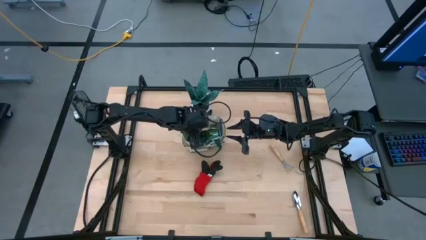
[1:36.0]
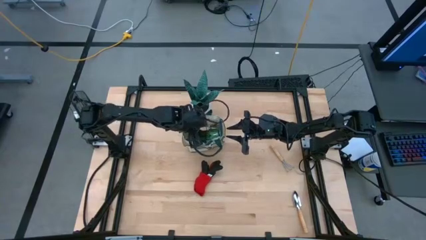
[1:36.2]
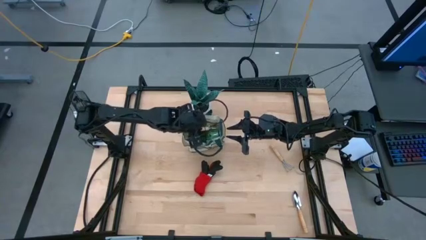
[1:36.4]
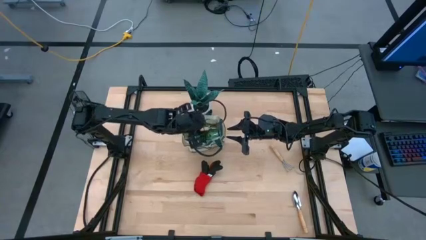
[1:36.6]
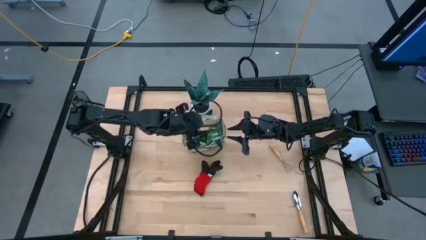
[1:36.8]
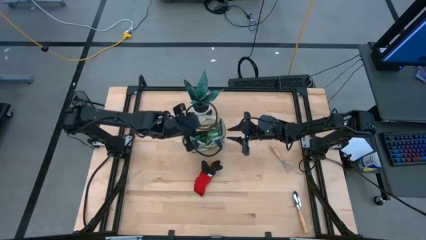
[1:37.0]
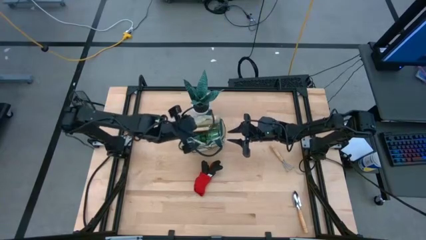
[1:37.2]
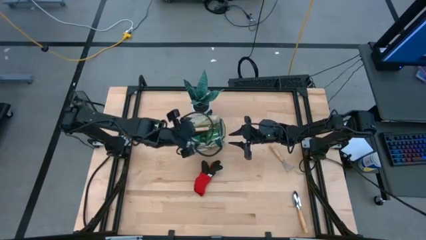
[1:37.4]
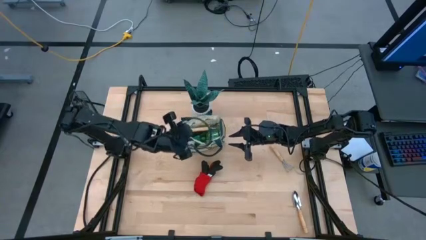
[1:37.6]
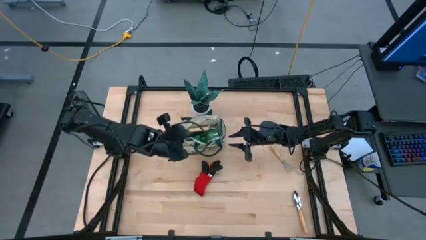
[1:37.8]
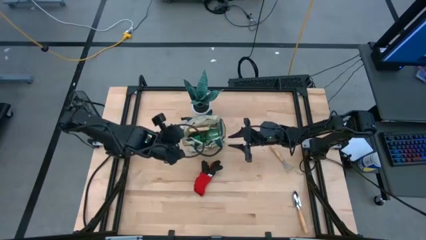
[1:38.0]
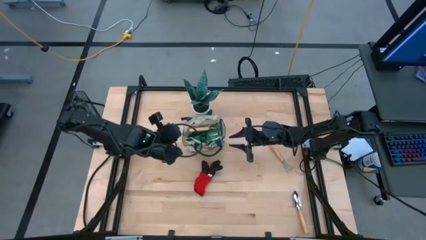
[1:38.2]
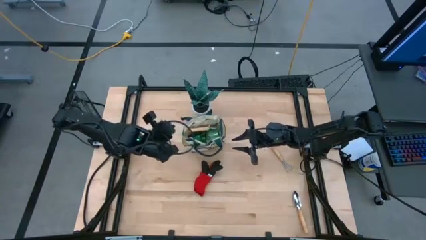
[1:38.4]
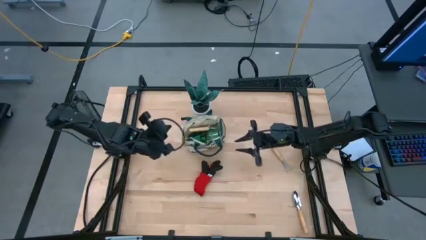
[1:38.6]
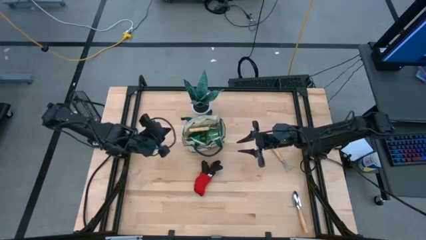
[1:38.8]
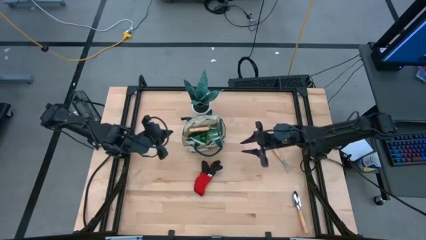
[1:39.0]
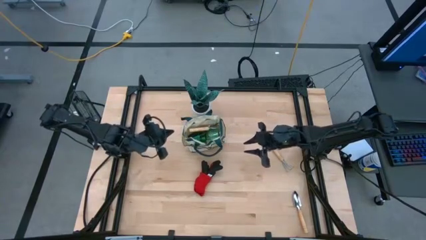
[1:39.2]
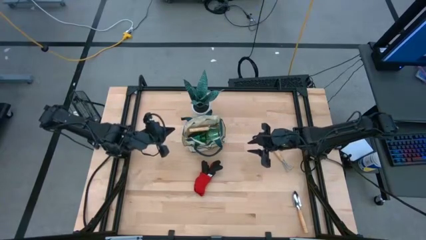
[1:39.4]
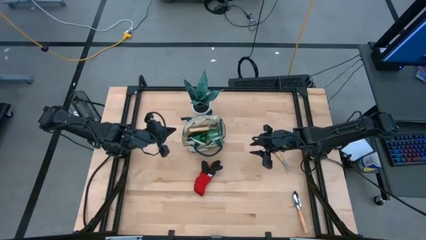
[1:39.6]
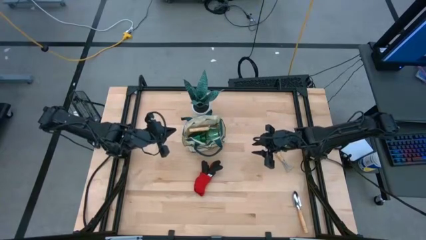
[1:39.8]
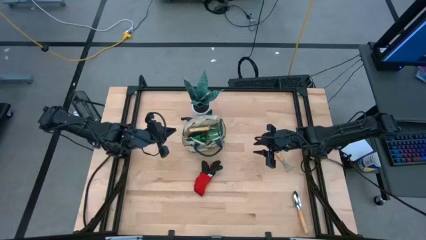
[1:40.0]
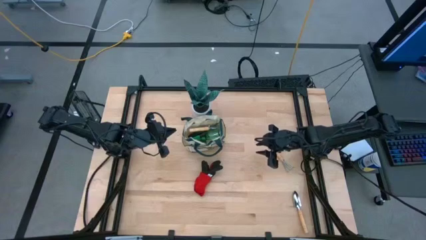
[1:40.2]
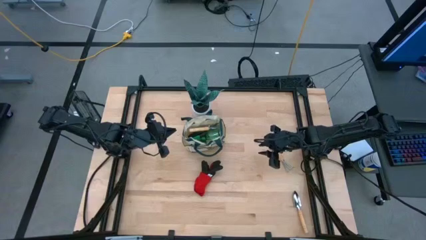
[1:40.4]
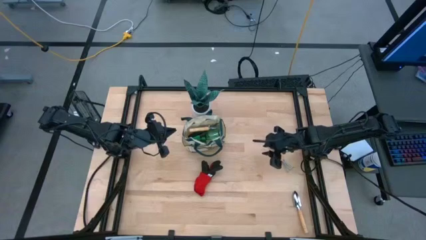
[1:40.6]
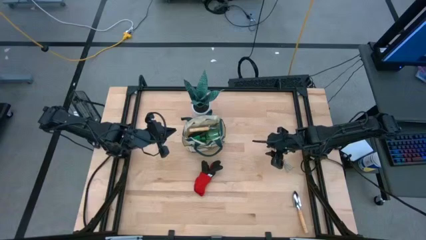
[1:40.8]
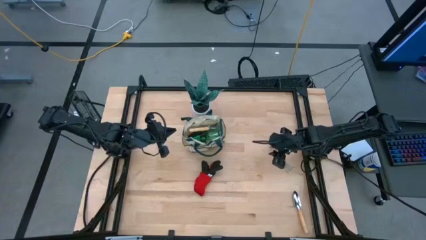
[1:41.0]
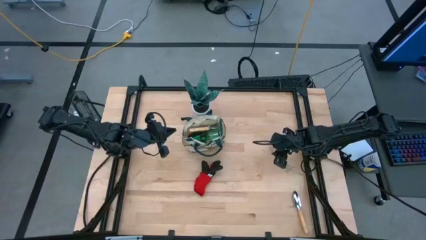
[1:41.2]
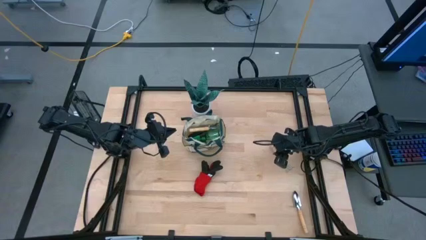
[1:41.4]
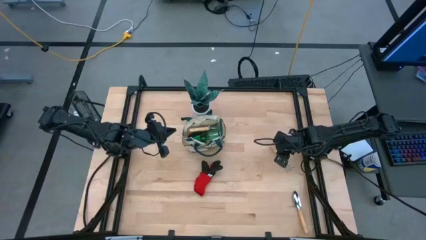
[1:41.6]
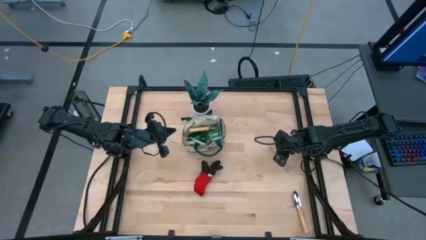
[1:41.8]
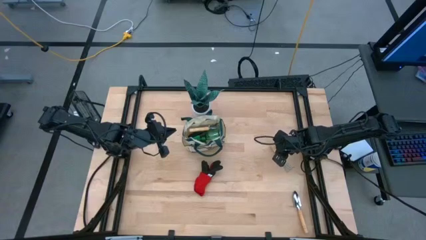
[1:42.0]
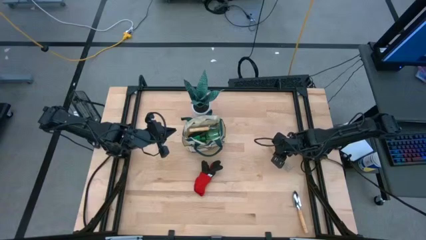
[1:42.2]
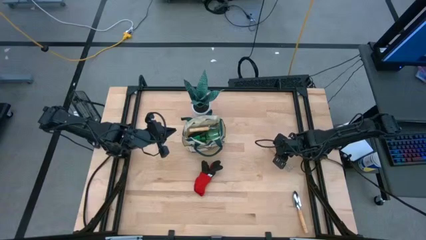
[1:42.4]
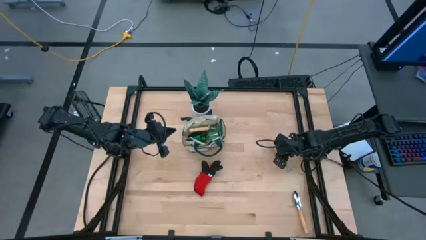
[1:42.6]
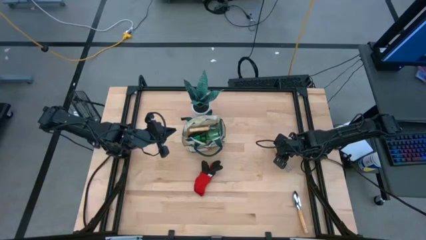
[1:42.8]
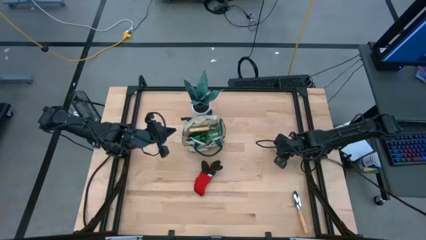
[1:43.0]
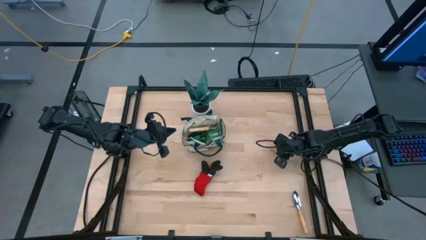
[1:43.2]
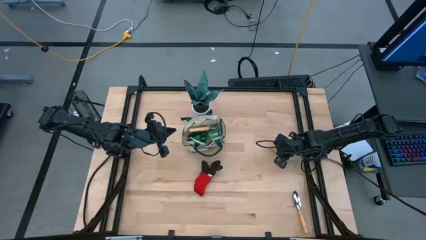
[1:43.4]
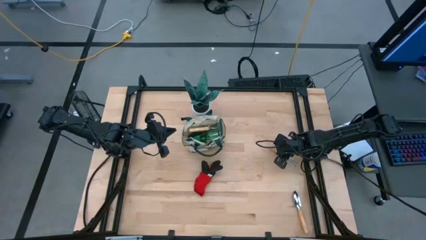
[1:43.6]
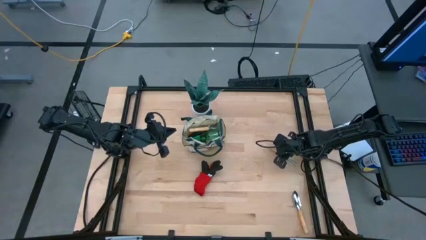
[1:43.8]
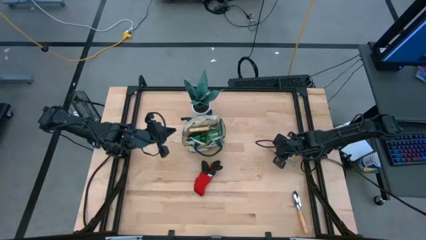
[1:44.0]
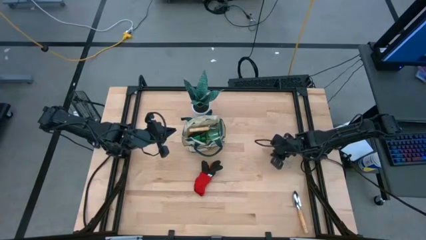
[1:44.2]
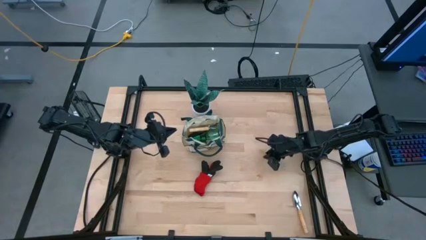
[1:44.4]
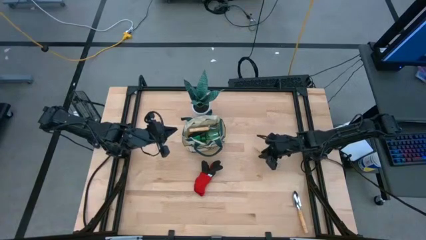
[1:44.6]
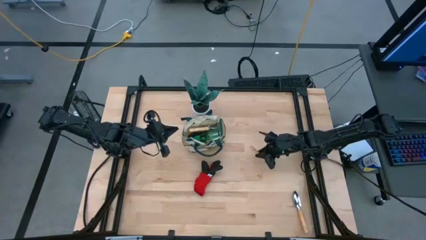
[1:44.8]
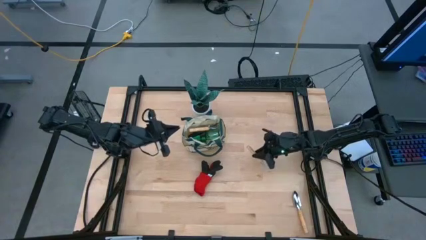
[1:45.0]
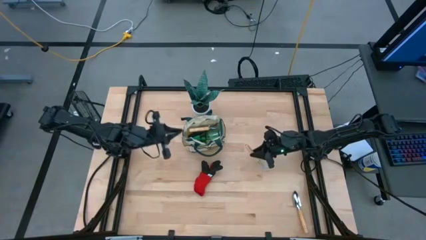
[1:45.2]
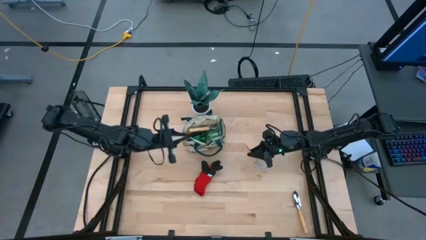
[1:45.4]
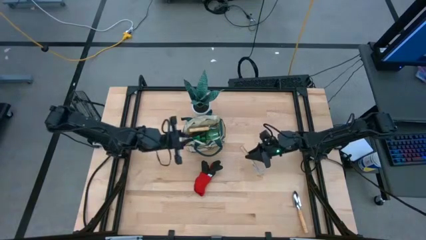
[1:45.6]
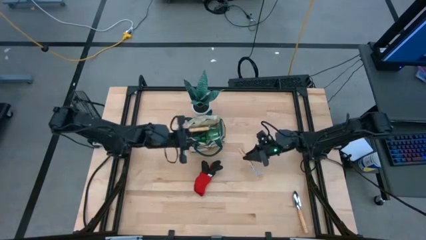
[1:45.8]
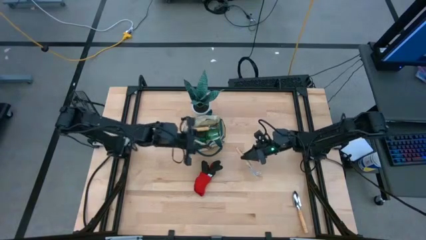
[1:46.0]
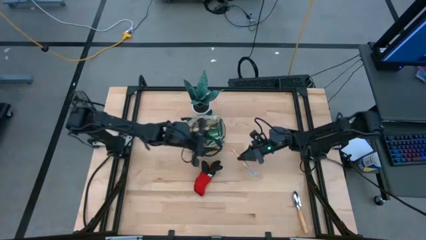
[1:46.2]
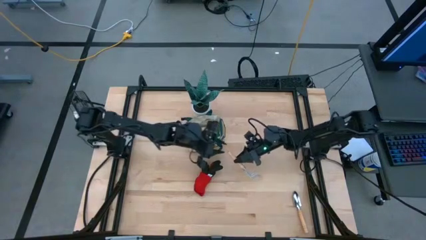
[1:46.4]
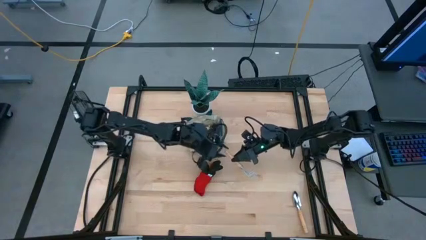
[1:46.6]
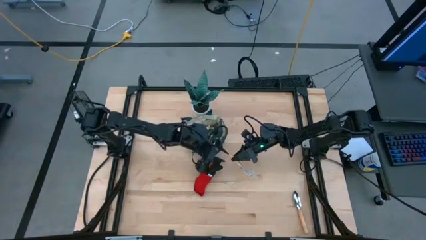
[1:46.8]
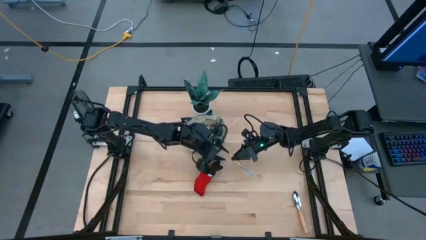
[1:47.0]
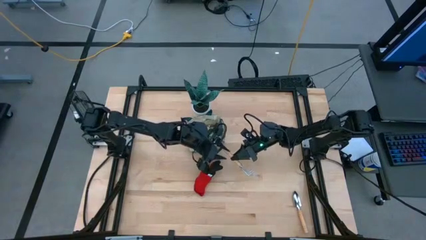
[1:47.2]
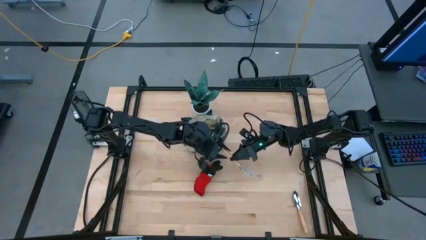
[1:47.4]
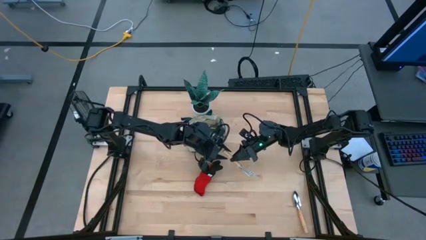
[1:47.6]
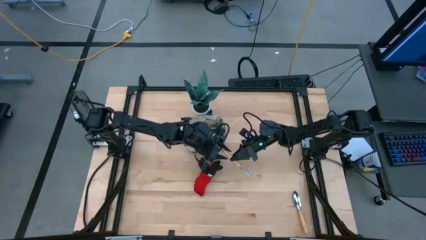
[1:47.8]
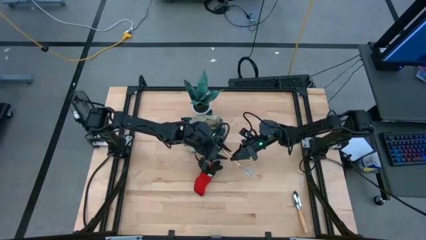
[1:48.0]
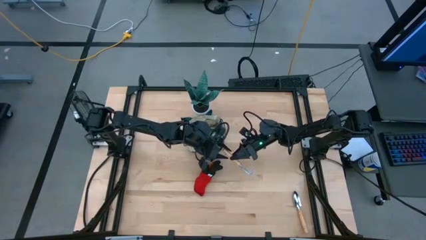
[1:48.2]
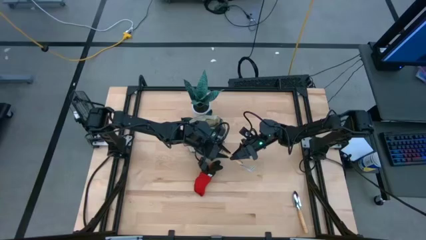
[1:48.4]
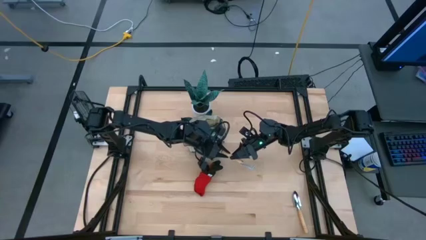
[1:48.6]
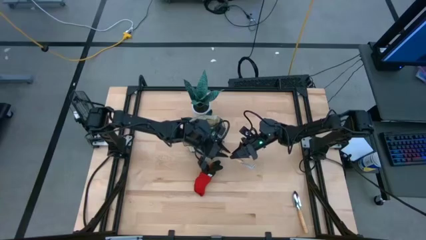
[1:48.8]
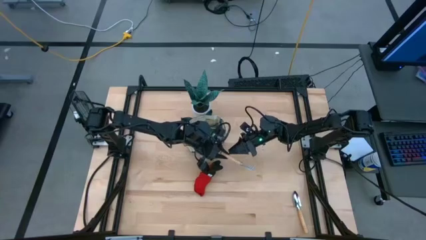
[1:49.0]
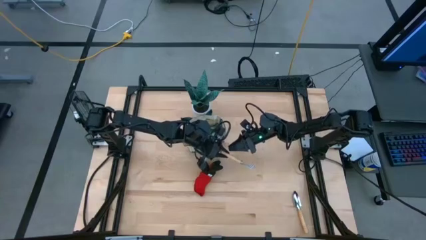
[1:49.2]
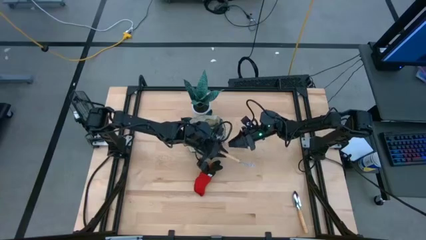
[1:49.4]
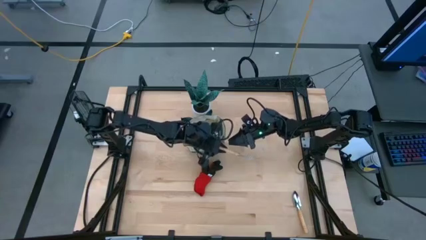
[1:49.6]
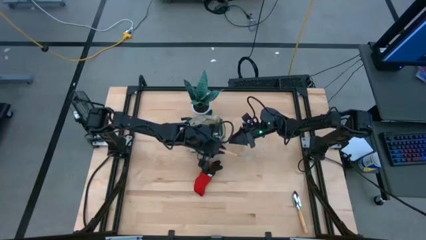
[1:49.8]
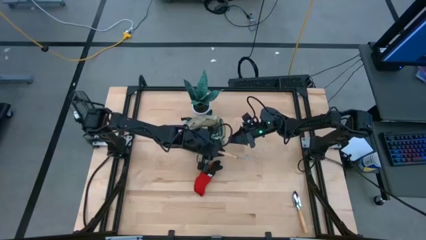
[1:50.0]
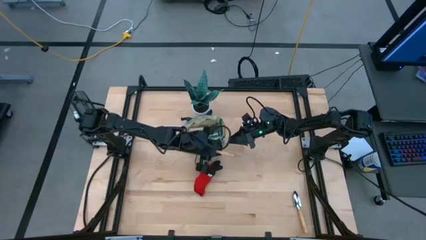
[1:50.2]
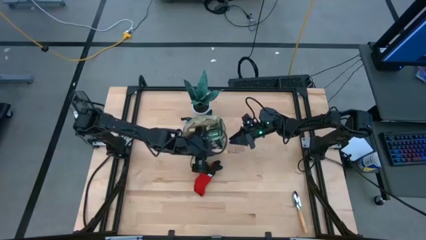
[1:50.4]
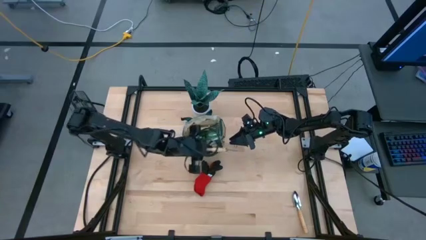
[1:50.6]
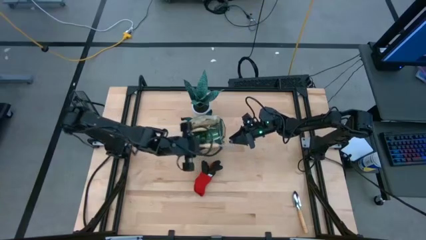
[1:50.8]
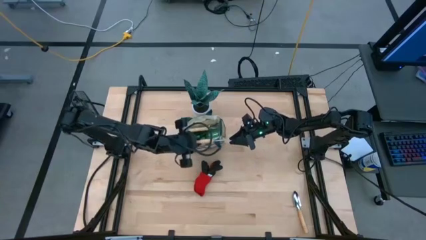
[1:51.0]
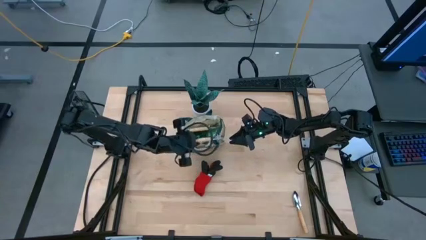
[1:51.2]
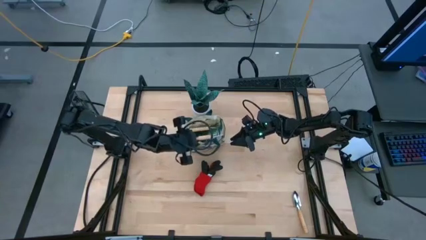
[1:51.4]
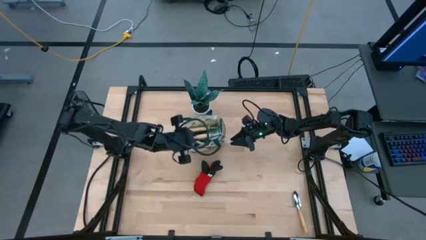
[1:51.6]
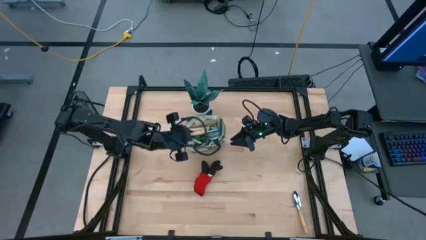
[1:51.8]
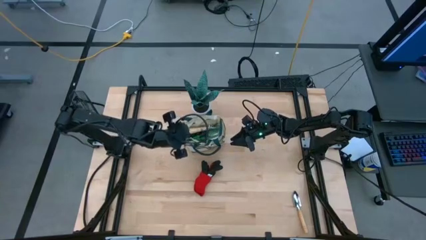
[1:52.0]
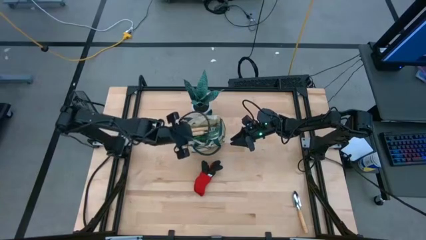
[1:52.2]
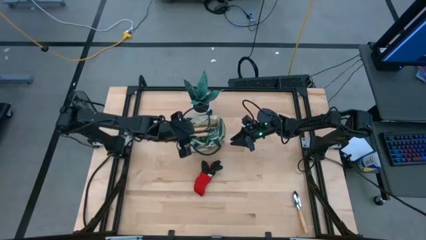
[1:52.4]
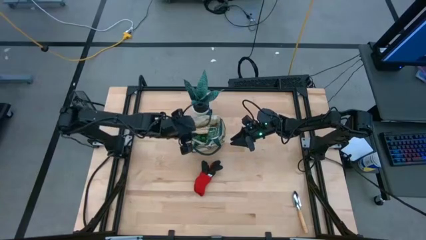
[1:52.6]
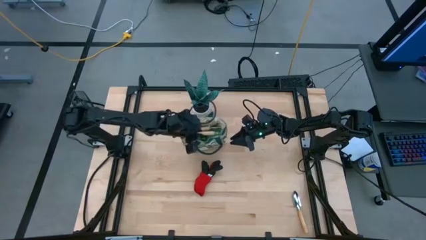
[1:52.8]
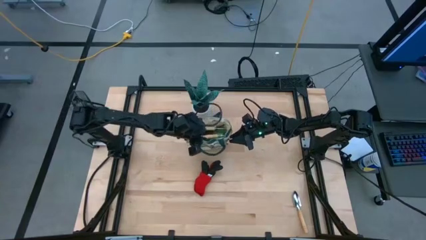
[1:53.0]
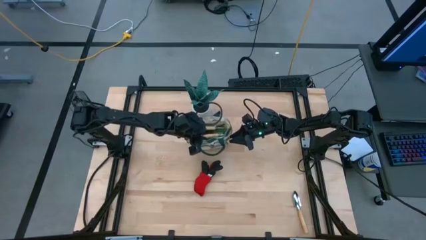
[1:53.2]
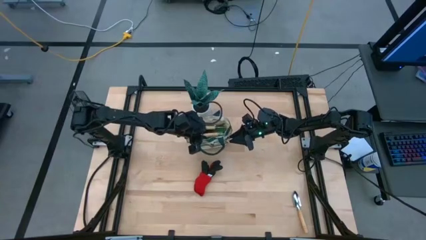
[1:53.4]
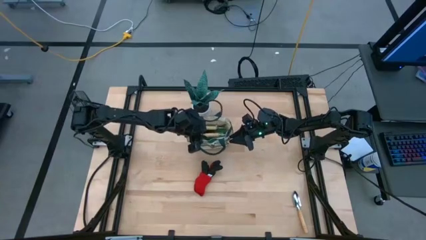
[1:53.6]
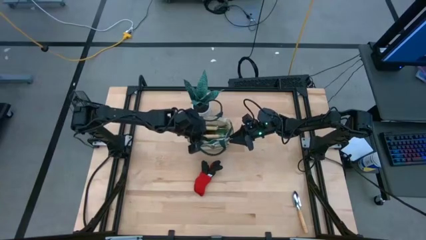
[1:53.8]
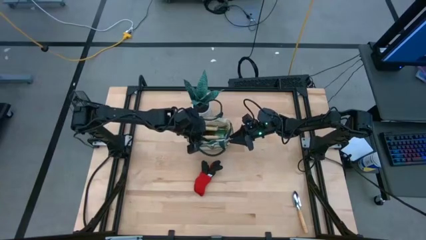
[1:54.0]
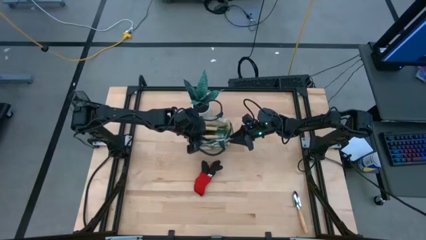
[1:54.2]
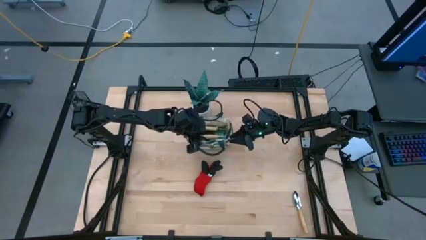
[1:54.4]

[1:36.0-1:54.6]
Task: Pick & Place Garden tools in Gardening bag
Put the brown hand rake into the gardening bag
